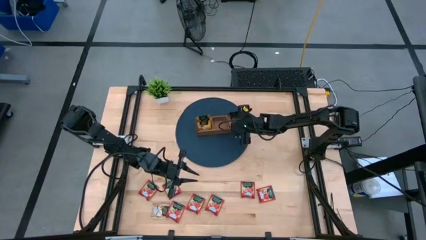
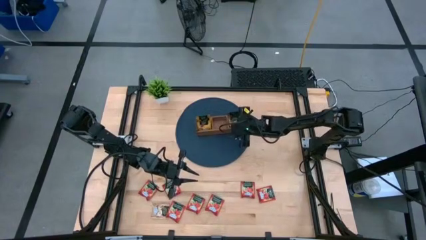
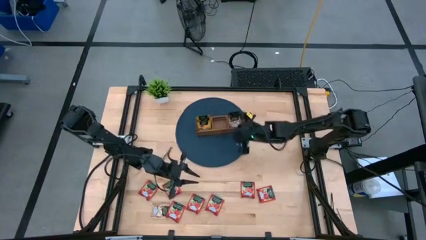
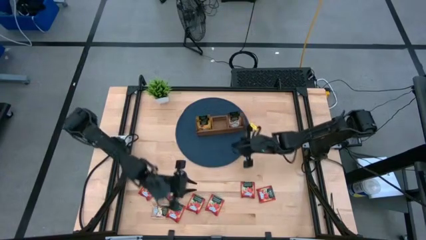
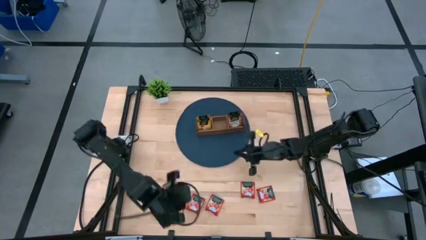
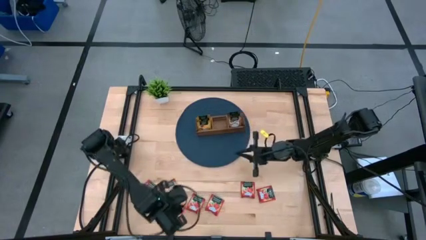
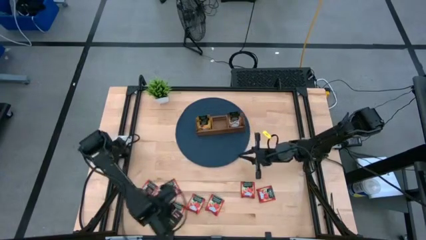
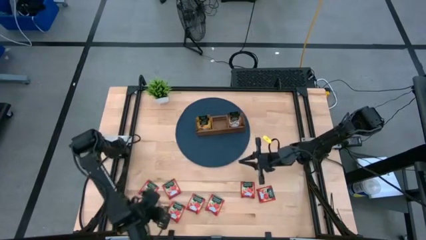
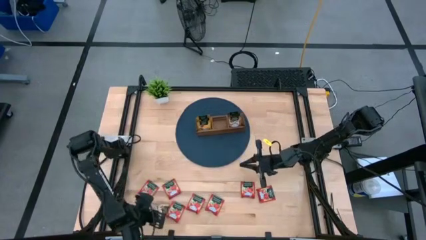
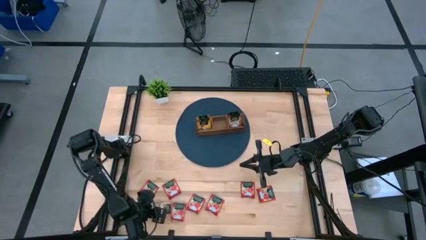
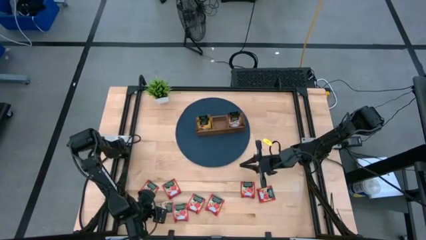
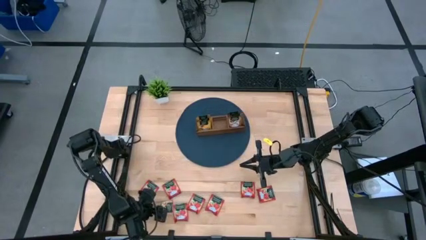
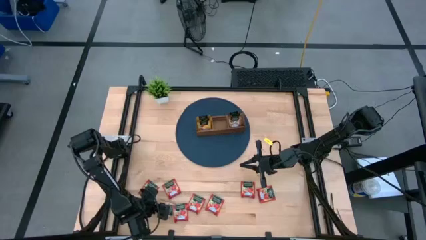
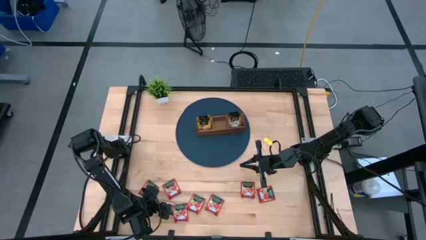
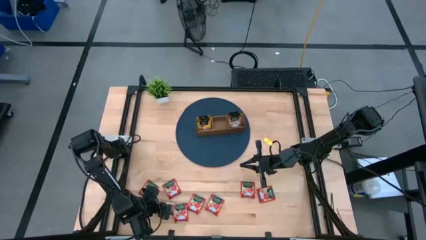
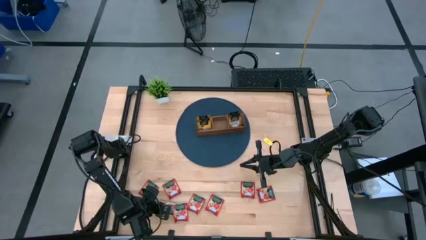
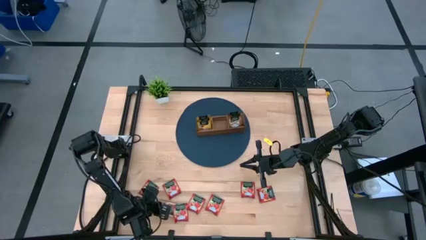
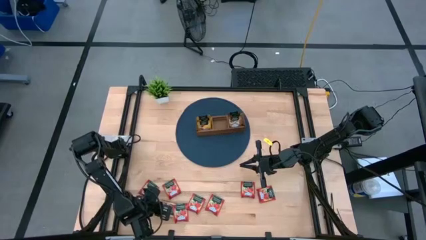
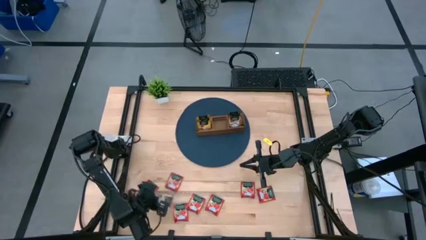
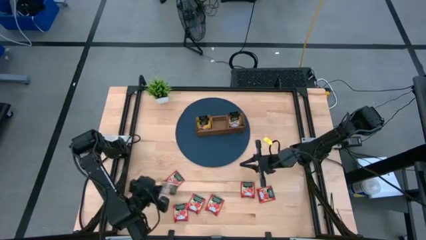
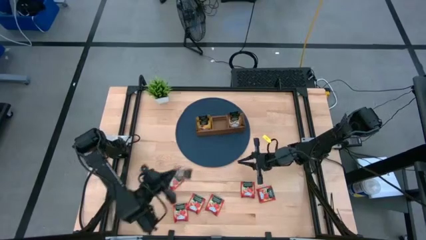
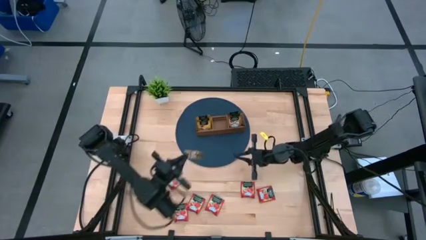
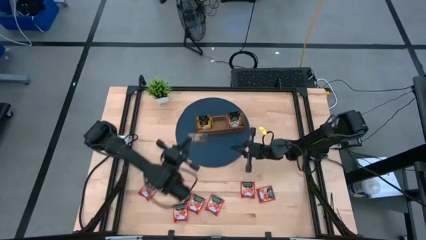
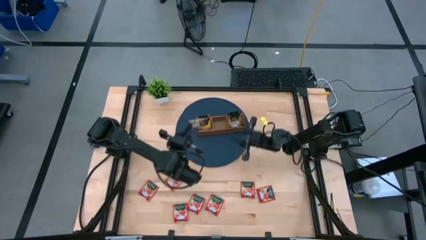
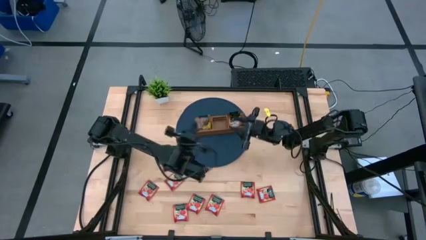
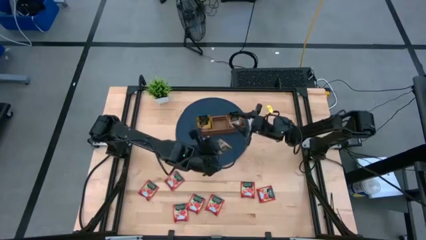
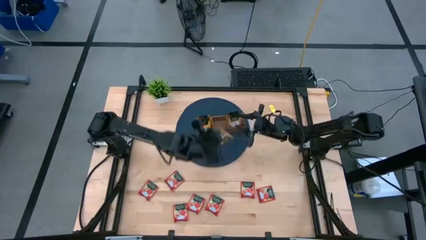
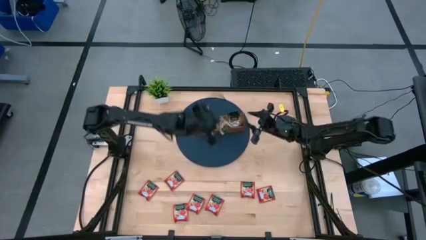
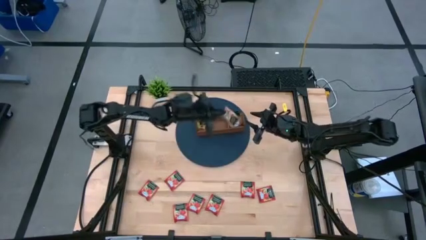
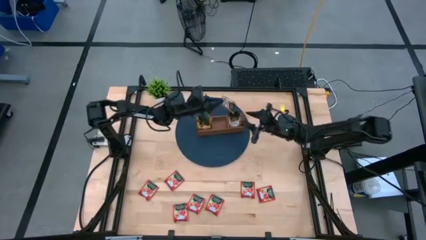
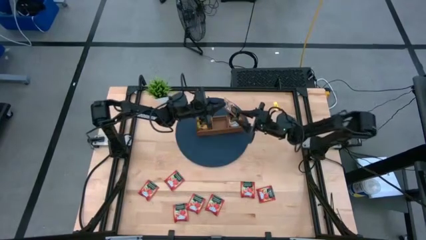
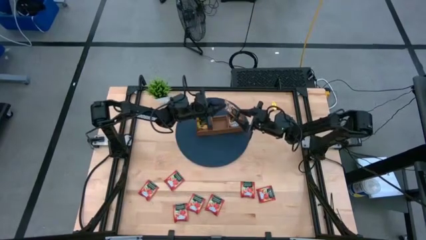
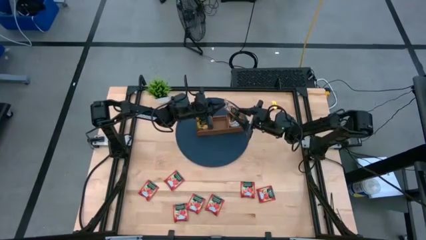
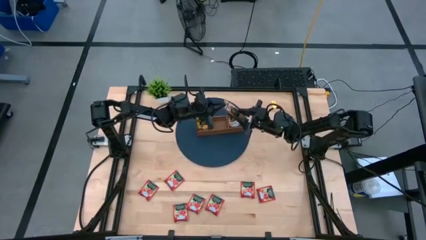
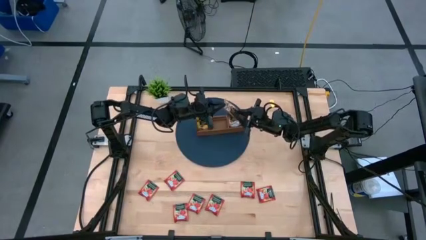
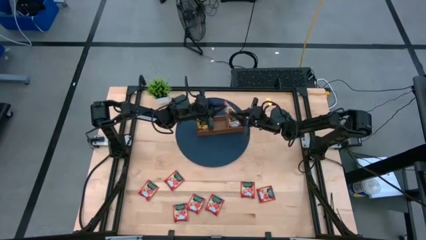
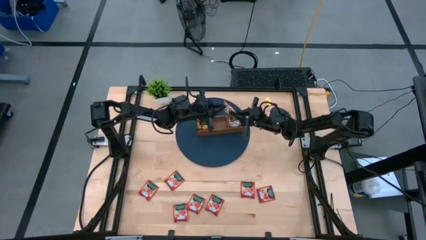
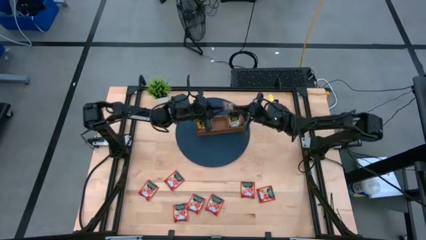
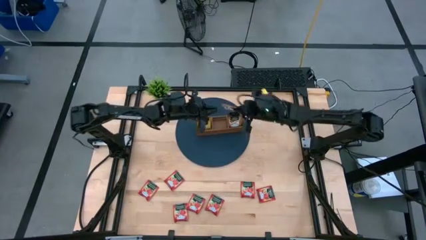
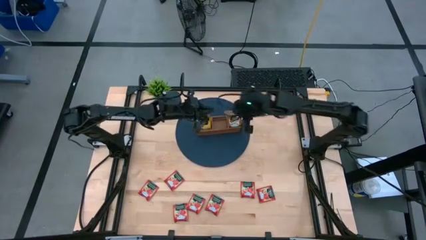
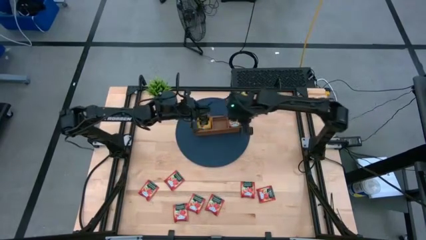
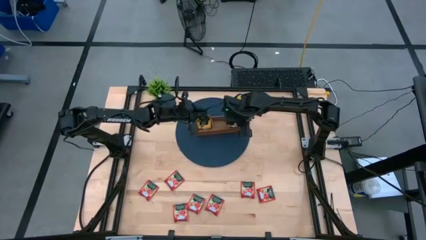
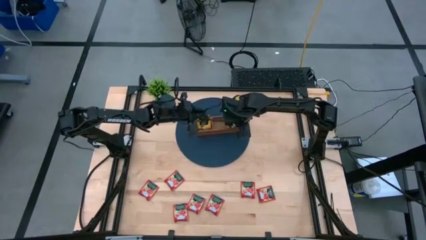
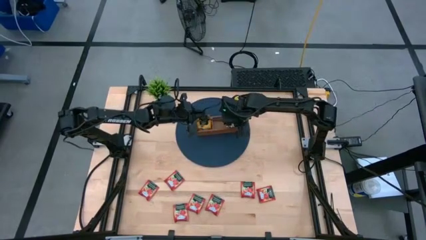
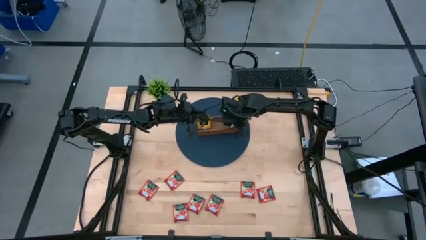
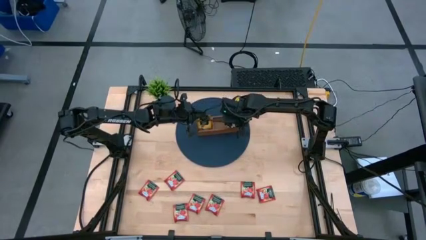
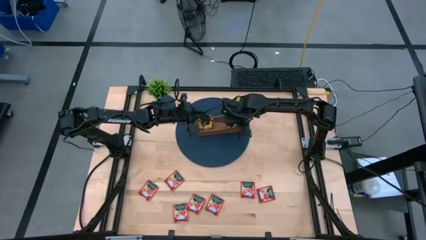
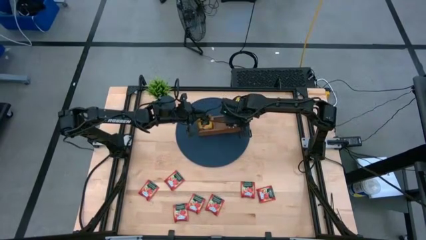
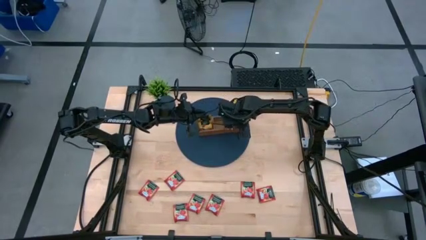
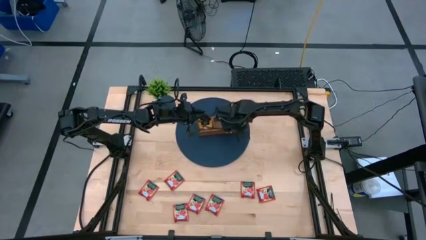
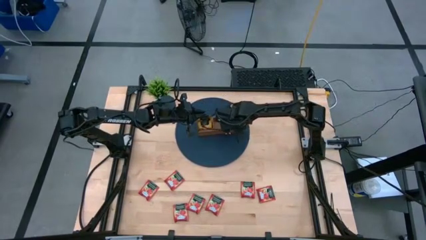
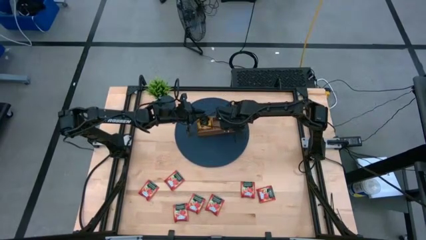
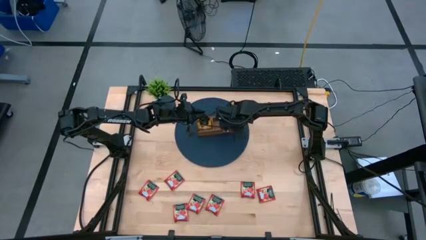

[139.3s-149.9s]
Task: Pick & Place Tea
Put the brown tea bag into the right section of the wooden organizer
